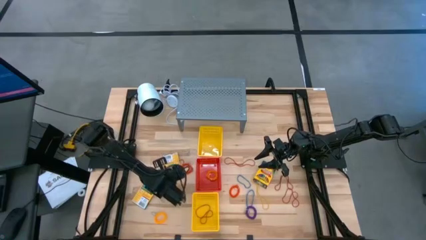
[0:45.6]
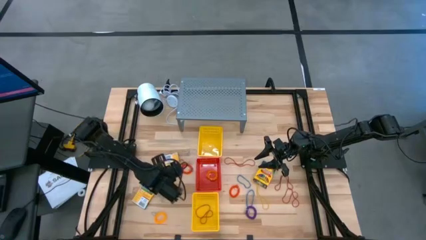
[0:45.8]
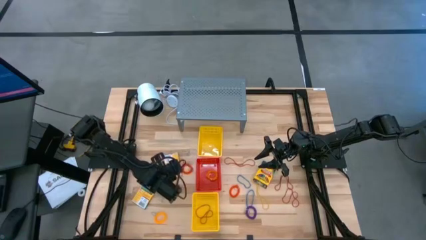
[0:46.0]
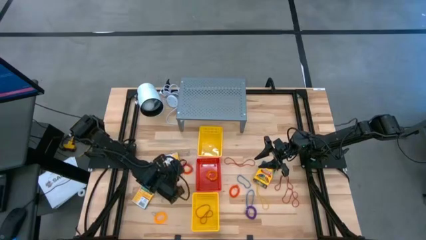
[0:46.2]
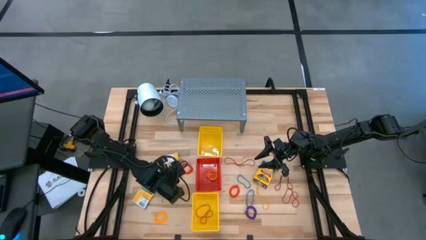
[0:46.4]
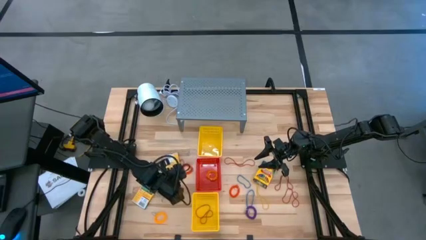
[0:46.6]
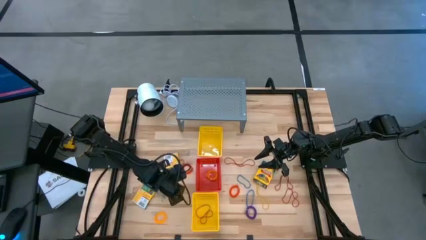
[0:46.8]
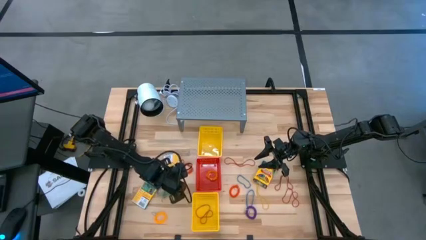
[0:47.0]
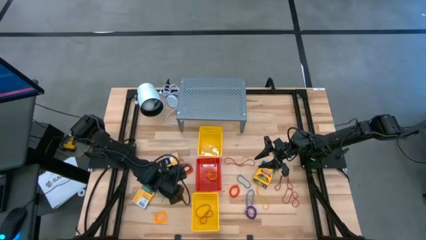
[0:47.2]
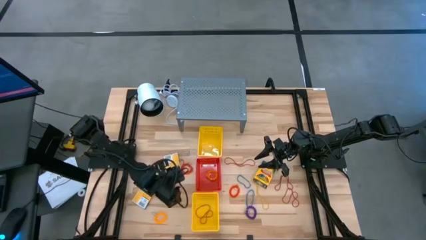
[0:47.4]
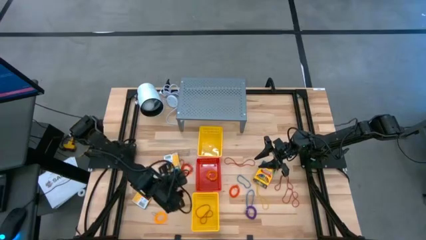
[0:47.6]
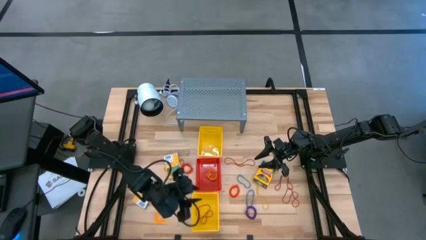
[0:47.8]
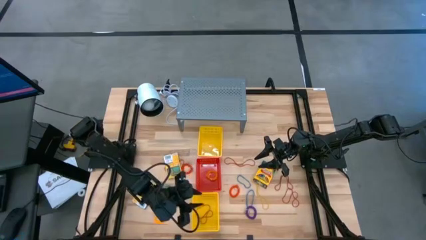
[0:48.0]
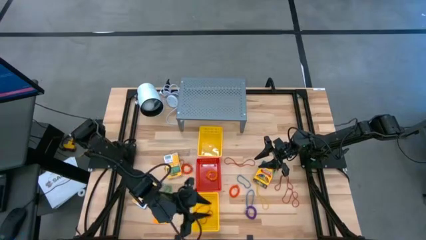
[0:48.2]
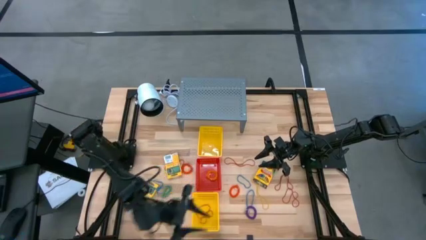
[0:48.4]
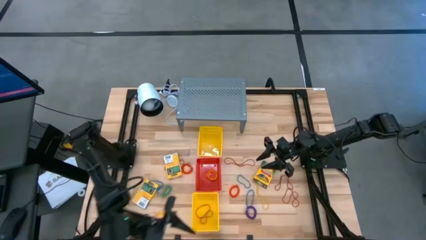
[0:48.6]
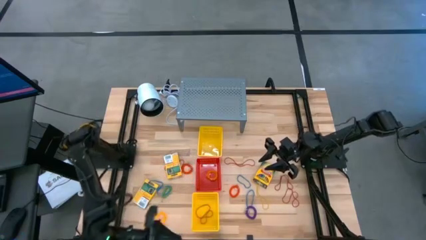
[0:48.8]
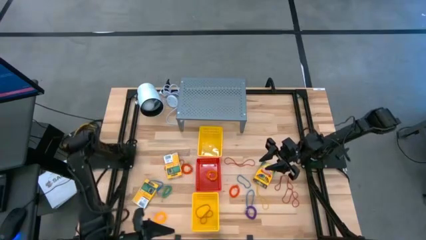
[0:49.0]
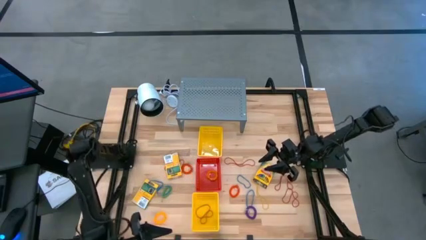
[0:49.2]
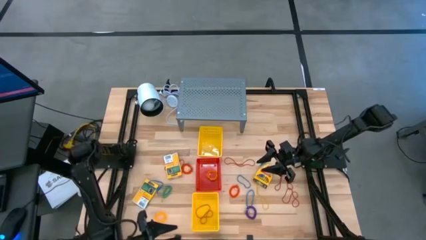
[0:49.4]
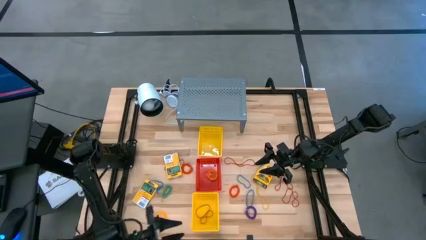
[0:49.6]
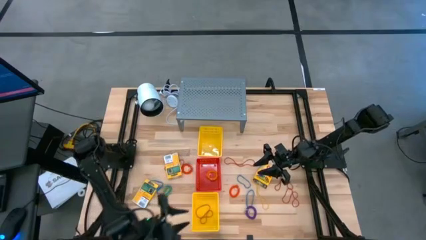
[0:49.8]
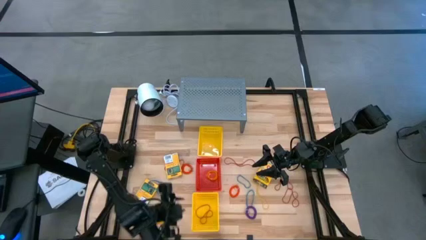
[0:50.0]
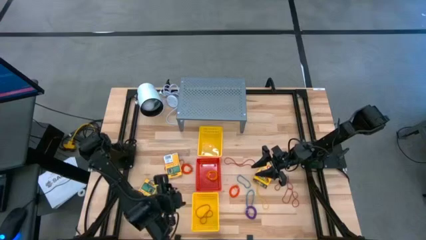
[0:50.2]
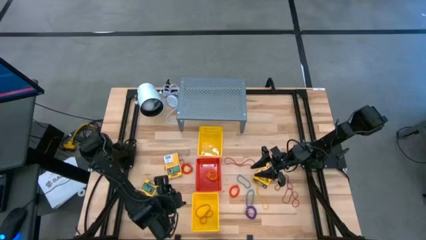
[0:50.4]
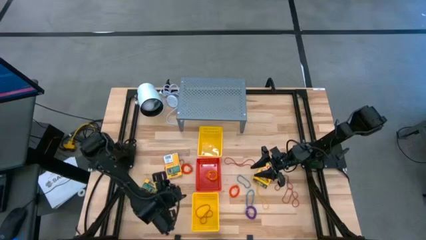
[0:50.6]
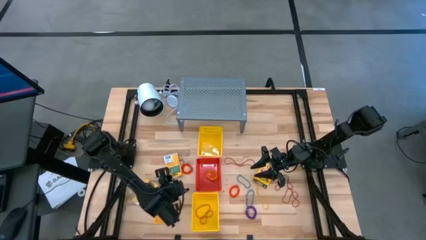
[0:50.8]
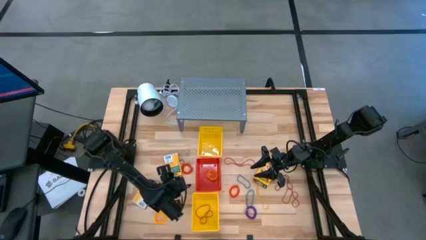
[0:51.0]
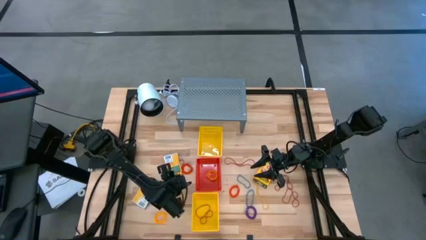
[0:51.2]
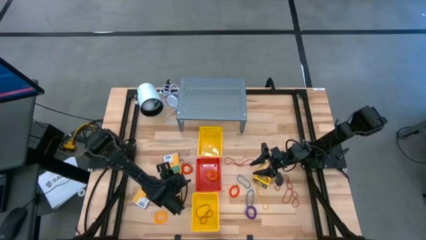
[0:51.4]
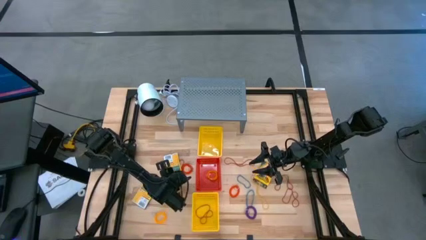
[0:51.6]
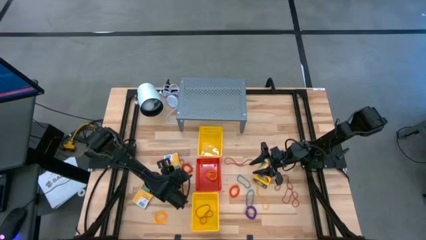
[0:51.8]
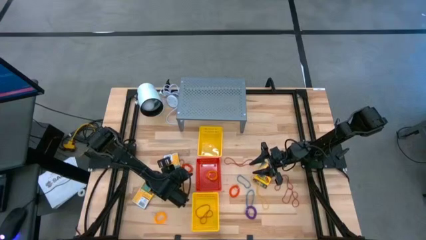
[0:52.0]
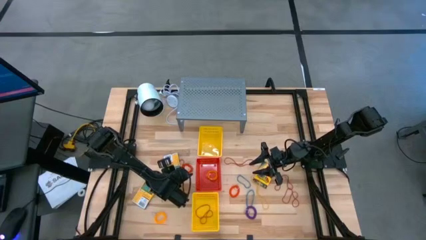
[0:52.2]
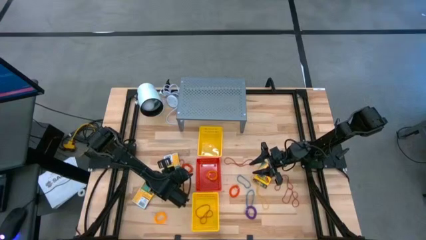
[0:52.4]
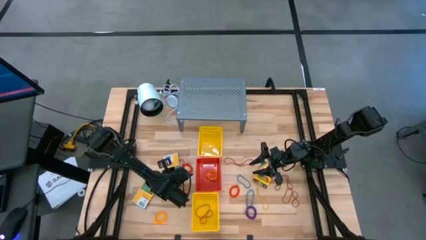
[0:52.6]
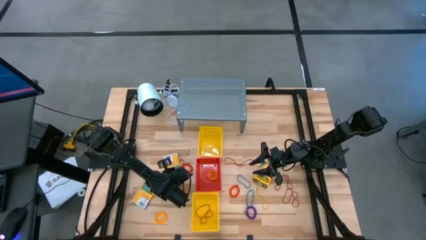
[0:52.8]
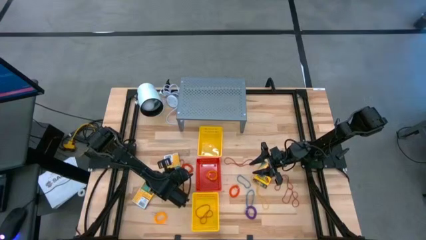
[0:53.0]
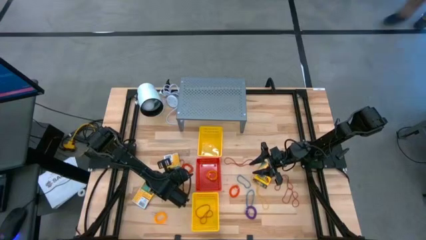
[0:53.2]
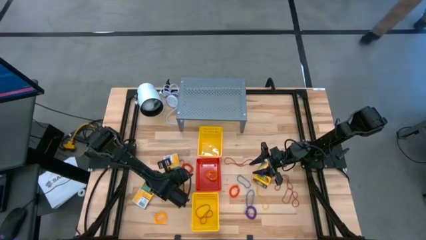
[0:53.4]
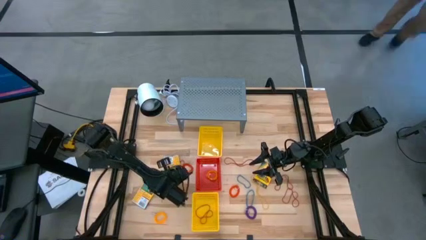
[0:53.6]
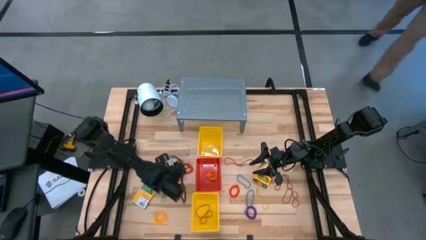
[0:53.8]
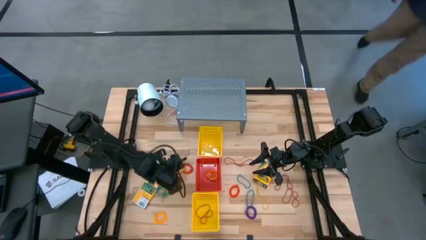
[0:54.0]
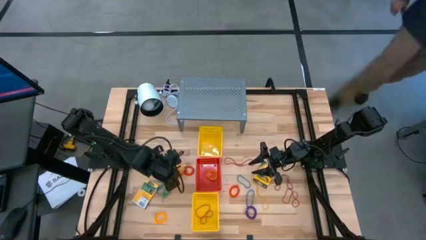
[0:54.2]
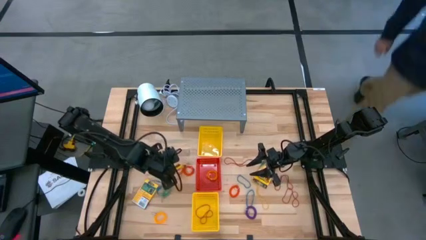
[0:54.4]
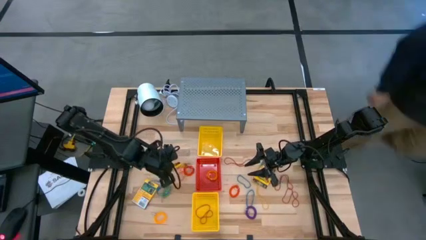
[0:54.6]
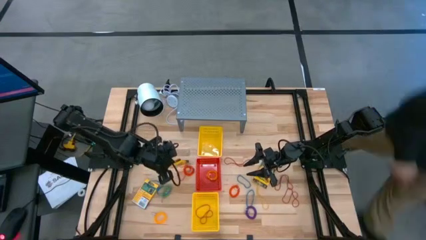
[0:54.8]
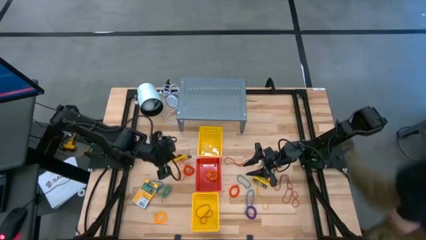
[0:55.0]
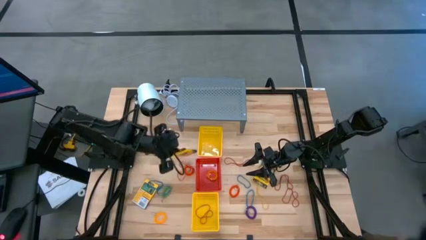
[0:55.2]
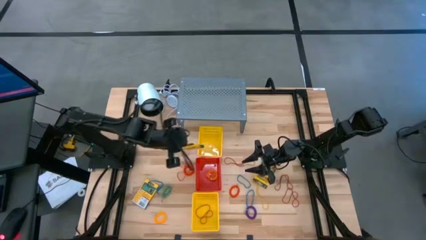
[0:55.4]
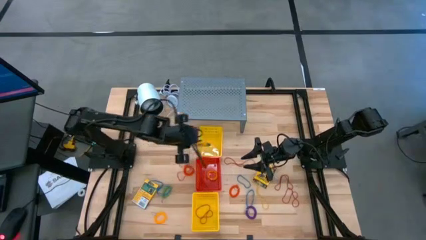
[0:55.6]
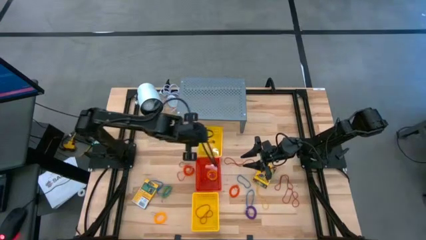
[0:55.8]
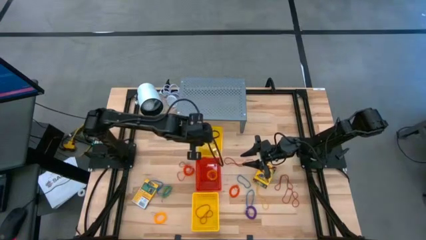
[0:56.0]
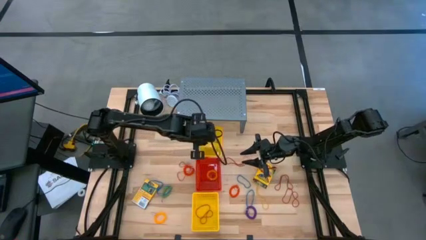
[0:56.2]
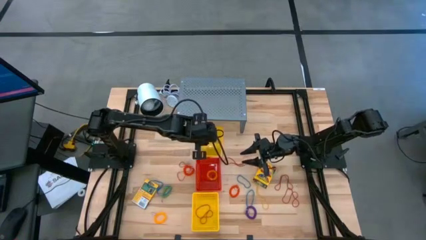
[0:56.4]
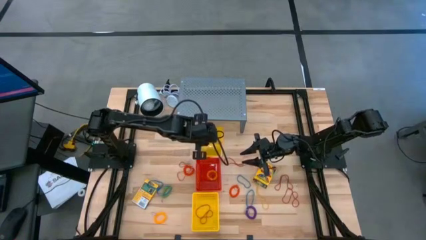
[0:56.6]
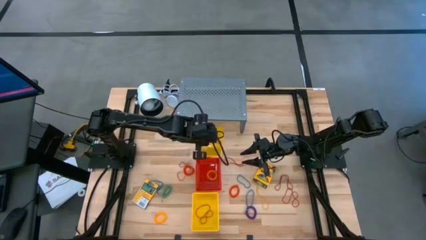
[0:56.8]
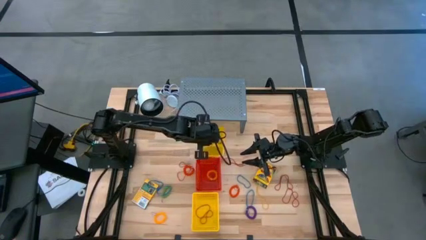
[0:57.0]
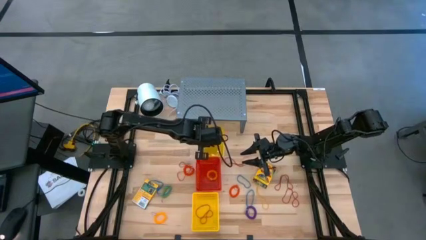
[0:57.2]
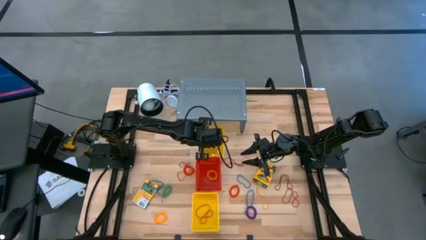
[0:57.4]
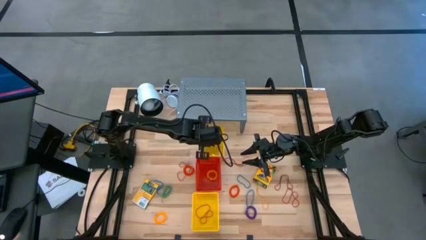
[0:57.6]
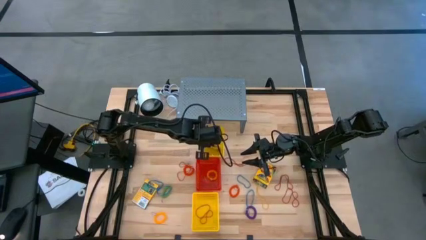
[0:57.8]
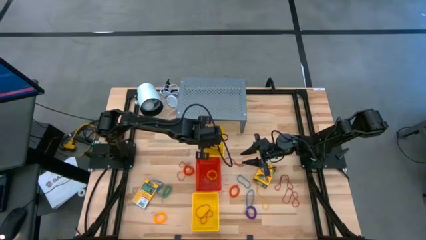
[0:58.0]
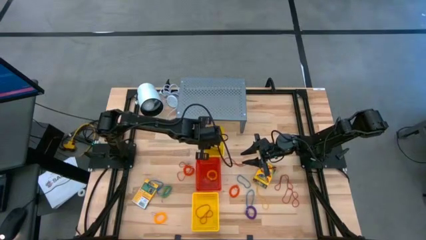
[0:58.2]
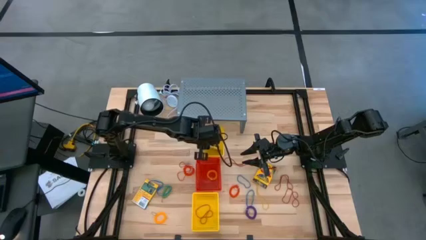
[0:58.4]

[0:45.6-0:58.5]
Task: Pick & Place Office Desk Supplies
Put the crayon into the top yellow bin

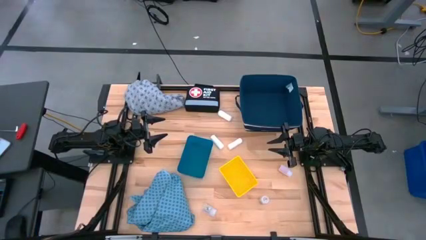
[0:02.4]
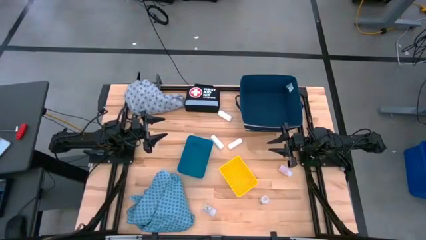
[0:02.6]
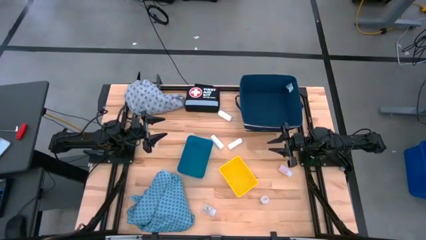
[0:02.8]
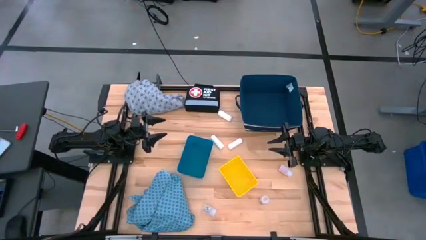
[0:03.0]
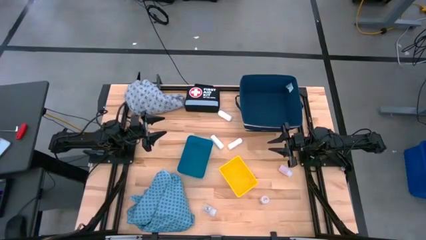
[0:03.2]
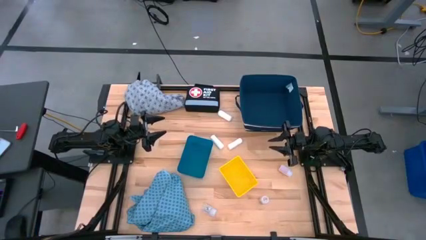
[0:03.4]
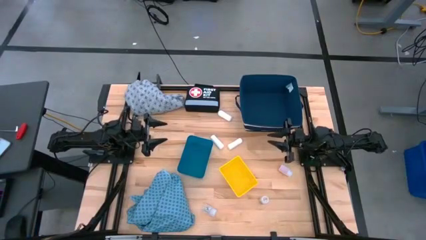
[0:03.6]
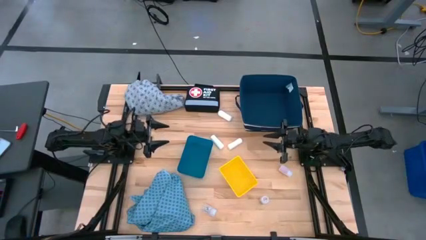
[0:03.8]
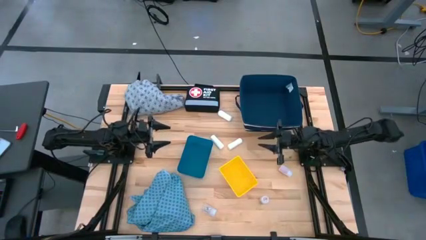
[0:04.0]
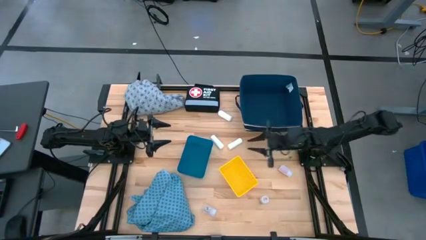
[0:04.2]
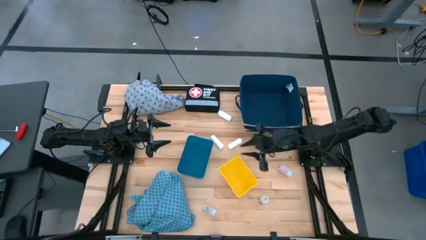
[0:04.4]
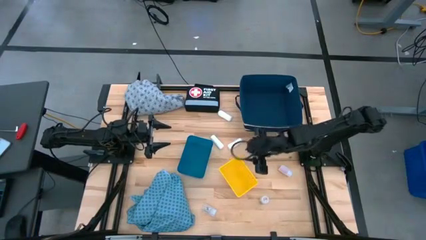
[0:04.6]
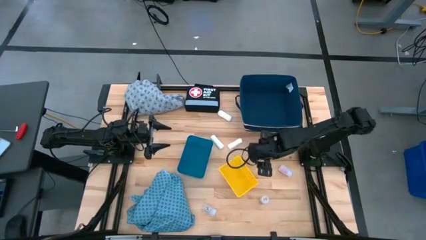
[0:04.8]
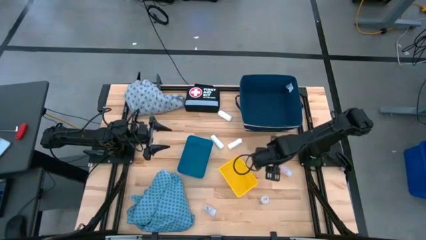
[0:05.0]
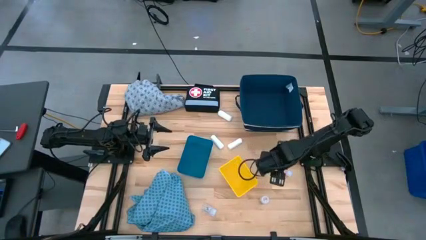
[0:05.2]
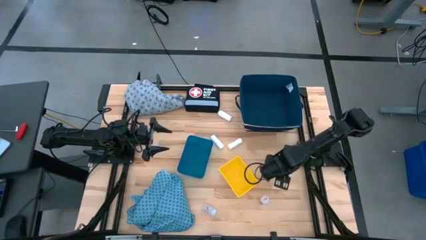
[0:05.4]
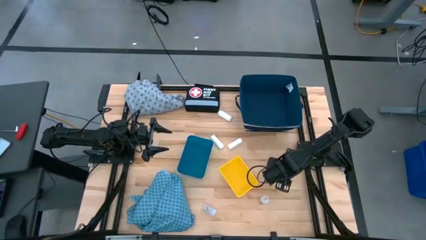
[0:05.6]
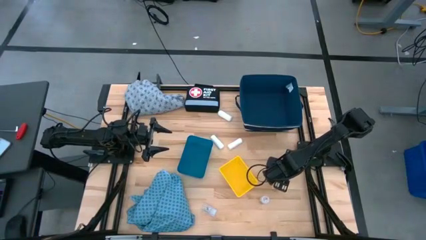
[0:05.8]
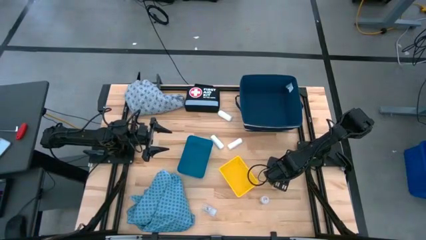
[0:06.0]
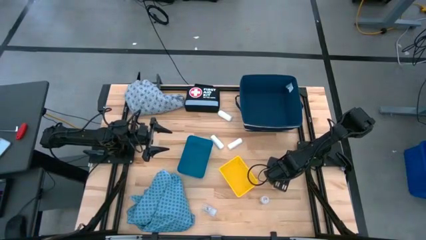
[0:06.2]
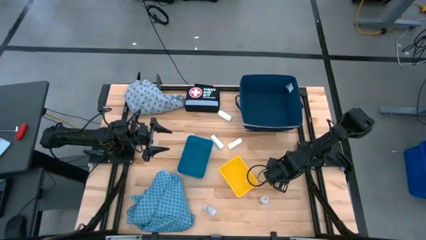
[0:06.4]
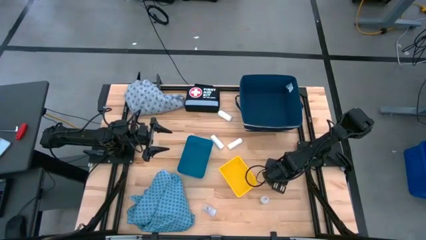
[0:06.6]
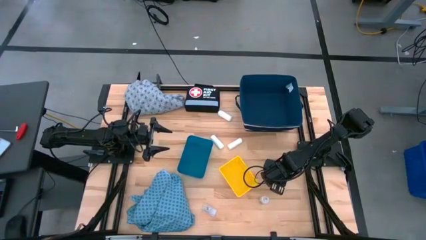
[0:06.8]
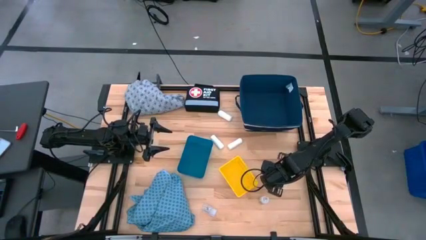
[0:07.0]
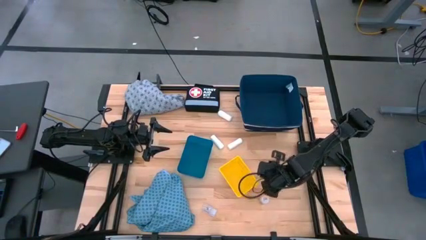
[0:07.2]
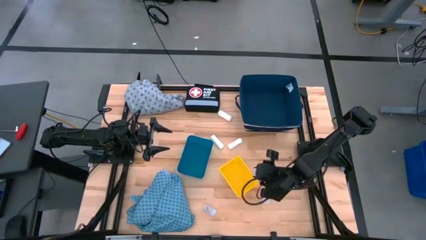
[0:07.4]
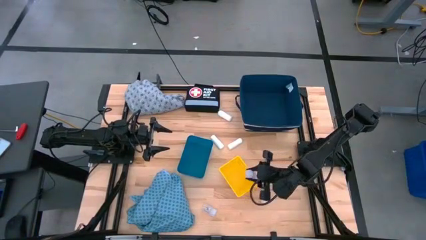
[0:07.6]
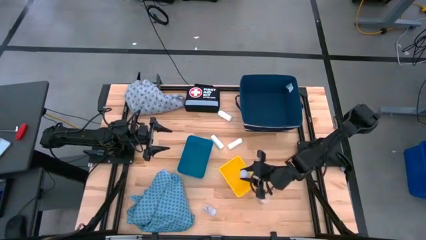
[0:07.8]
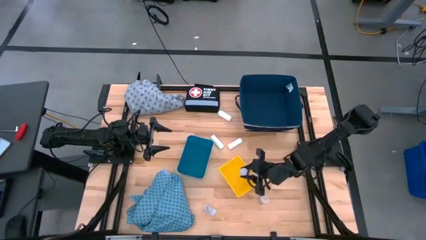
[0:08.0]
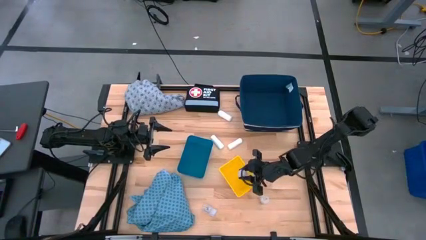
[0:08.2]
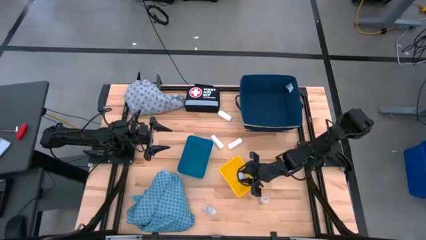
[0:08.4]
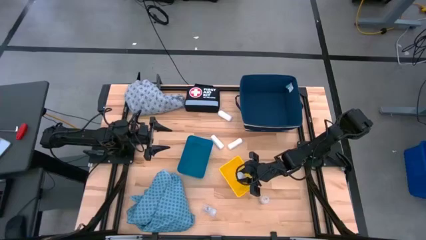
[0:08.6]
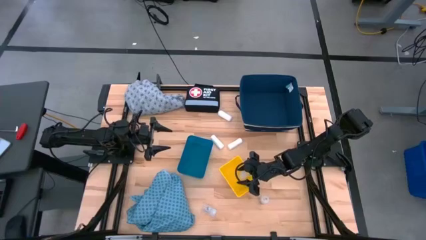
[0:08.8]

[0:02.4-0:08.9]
Task: Pick & place medical supplies in basket/bin
Put the top white pill bottle into the yellow bin
